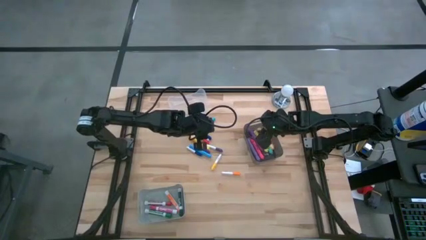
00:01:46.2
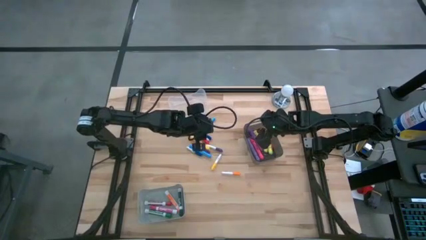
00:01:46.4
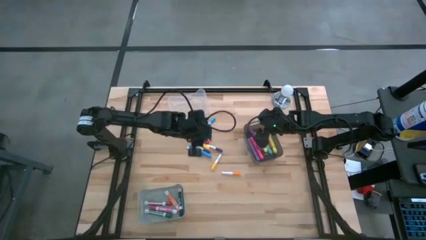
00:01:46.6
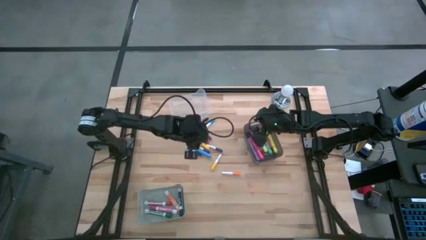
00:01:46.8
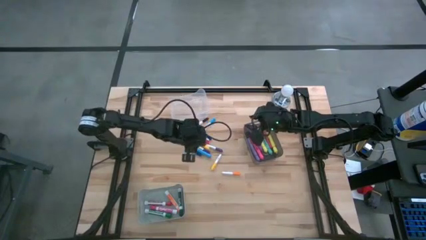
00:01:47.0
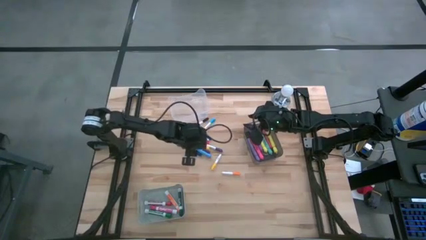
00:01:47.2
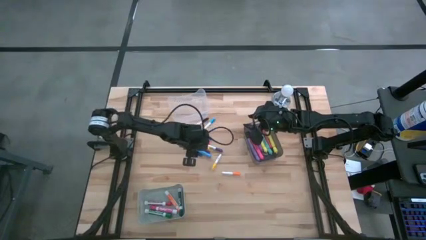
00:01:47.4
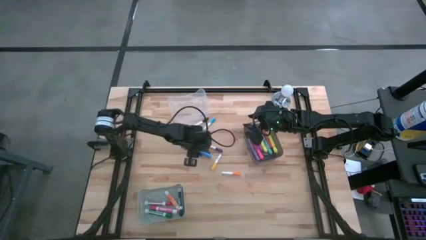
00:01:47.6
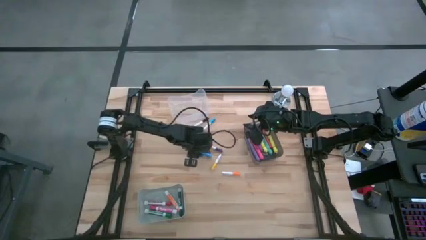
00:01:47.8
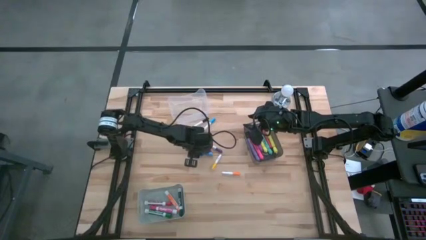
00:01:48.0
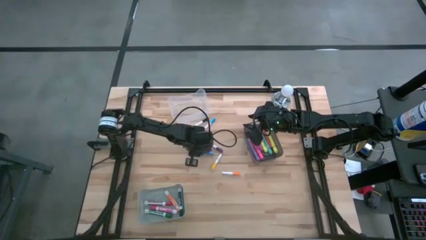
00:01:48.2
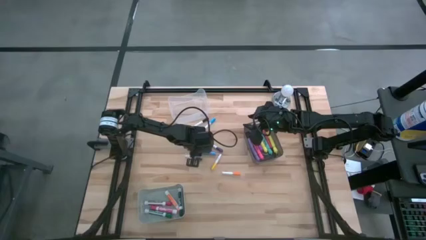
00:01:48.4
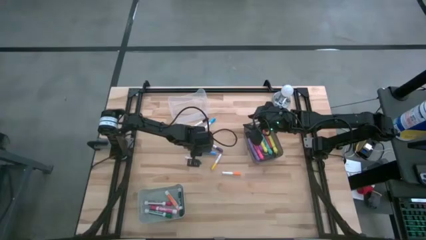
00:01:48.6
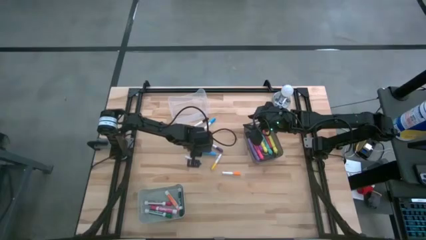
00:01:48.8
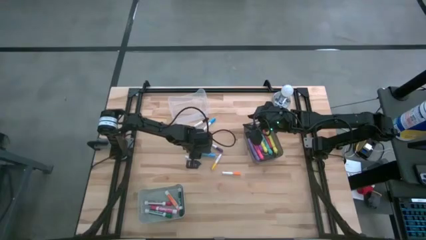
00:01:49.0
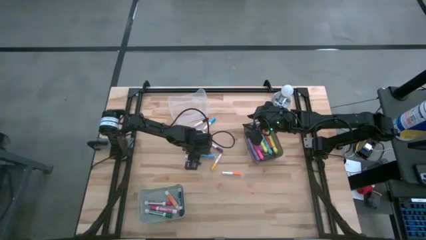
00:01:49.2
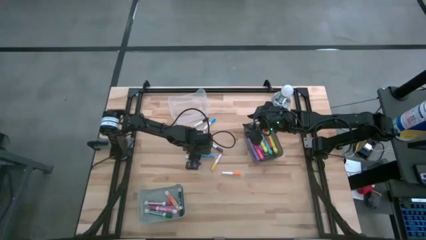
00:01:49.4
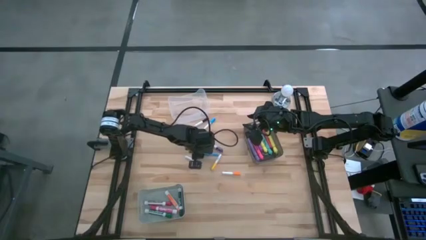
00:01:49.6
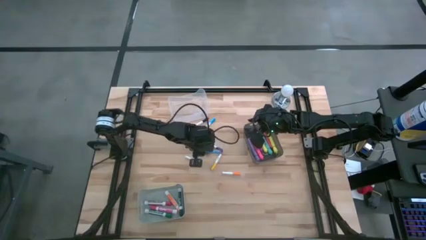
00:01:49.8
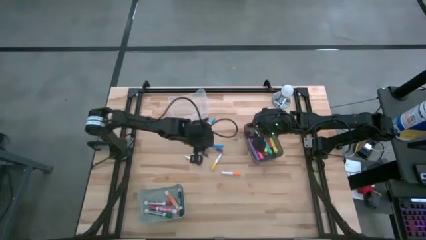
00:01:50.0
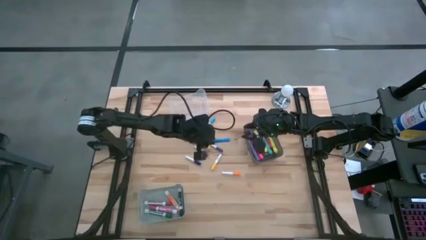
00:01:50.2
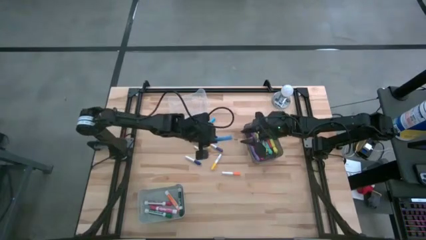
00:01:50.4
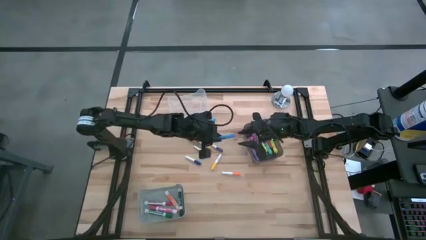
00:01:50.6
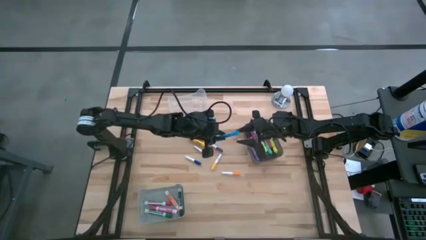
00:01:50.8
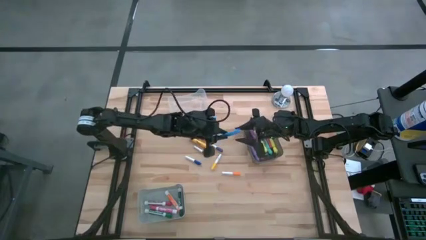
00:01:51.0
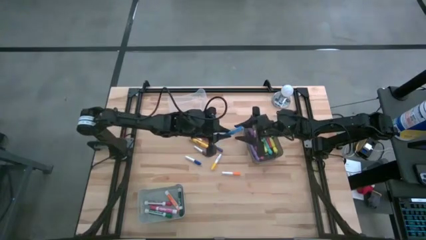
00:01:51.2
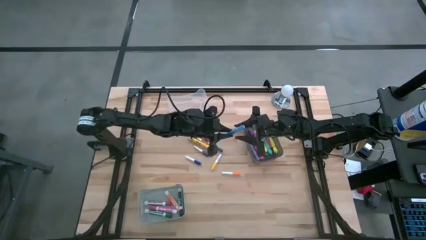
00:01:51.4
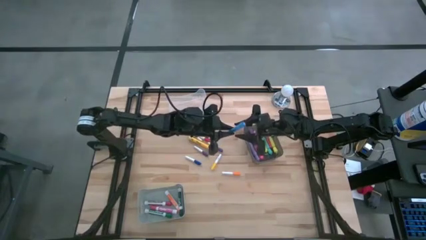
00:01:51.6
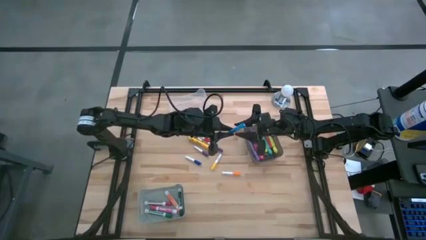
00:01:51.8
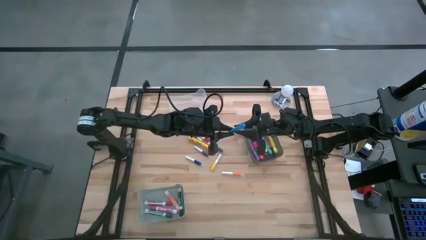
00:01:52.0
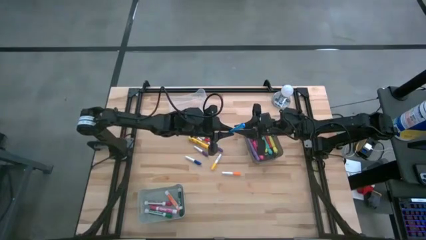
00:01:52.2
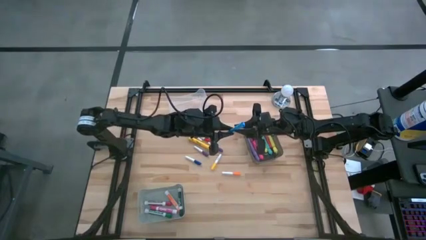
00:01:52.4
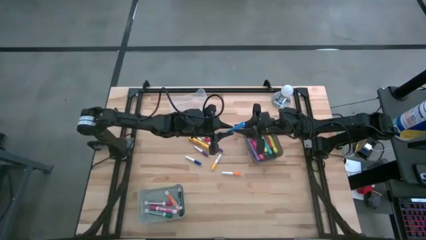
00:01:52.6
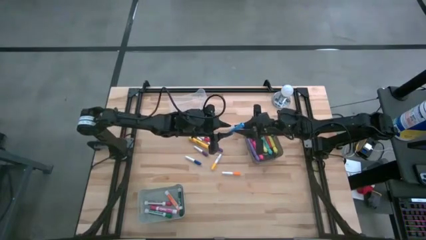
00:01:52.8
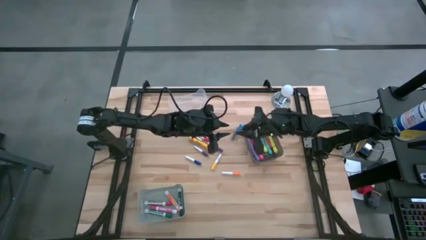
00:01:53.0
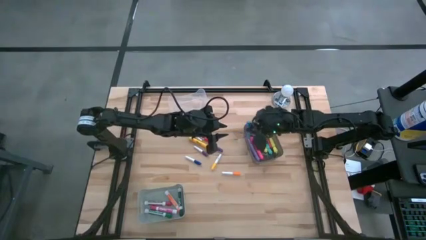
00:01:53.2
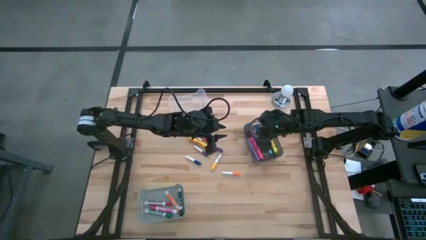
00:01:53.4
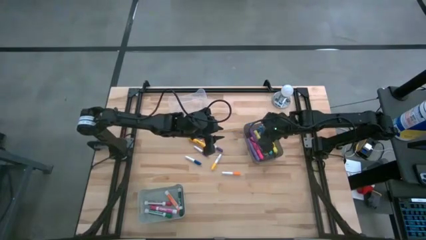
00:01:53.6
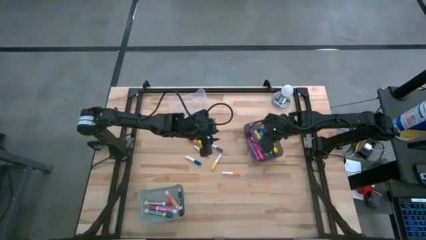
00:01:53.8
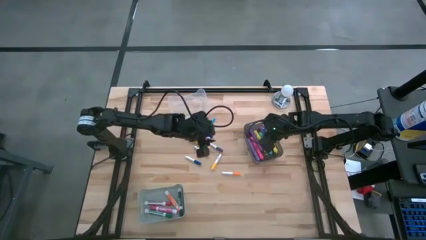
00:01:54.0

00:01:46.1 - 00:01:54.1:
Task: Pick & Place Markers
Put the light blue highlighter pen into the black bin

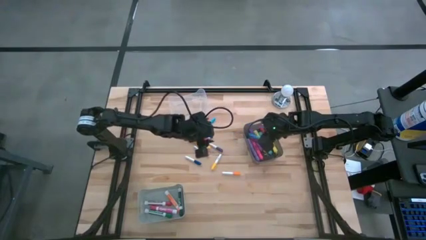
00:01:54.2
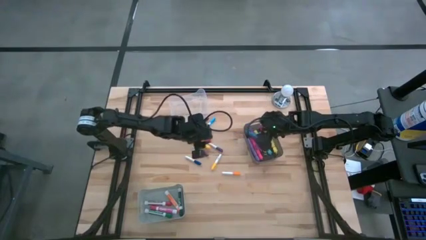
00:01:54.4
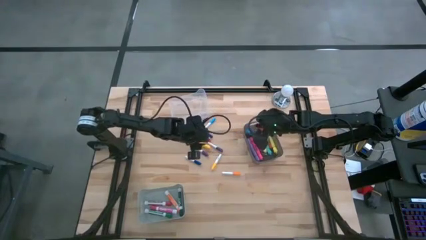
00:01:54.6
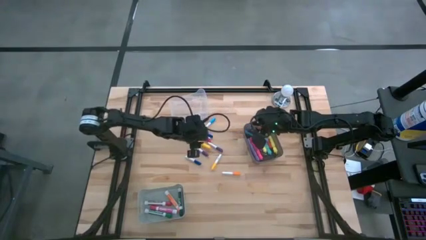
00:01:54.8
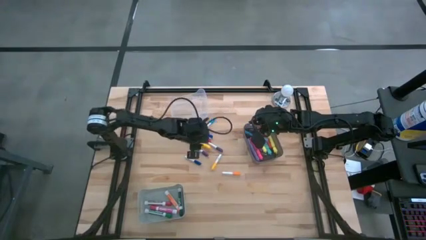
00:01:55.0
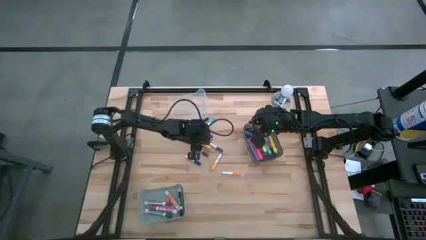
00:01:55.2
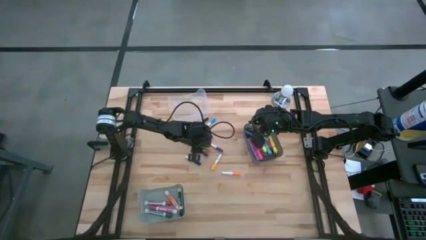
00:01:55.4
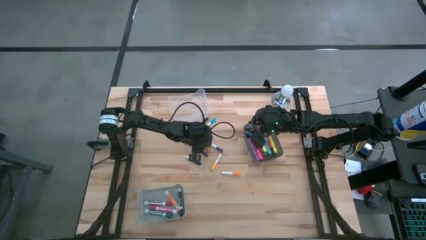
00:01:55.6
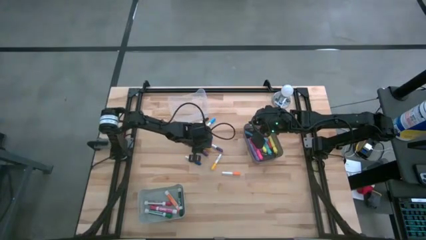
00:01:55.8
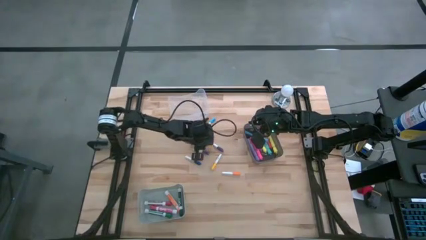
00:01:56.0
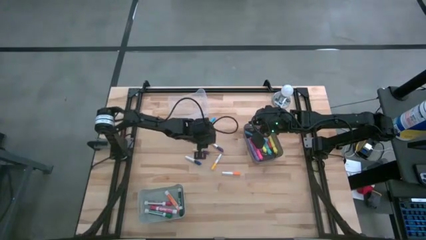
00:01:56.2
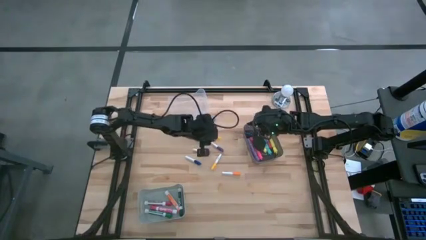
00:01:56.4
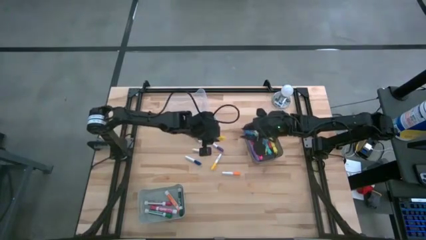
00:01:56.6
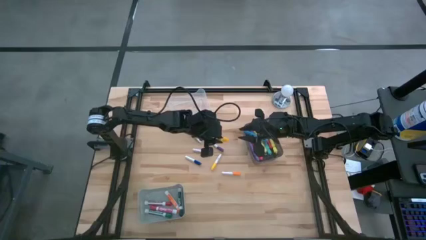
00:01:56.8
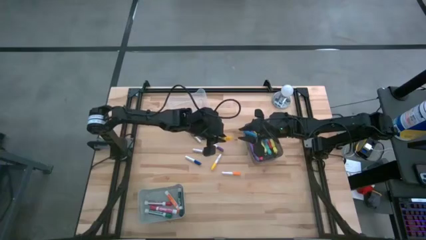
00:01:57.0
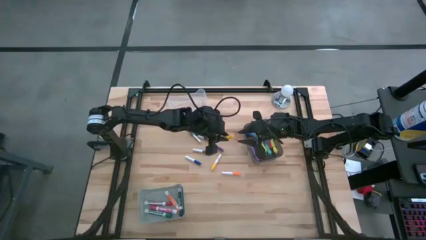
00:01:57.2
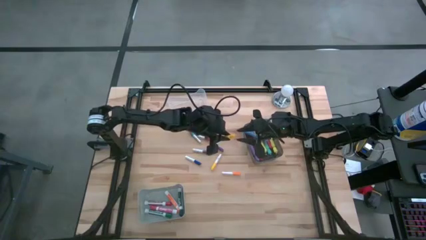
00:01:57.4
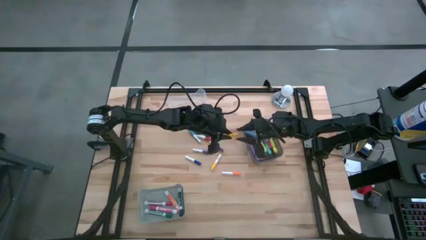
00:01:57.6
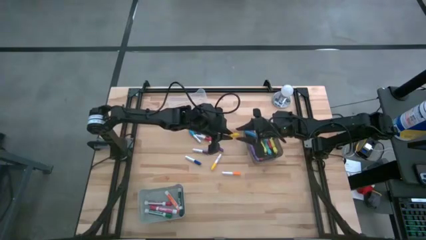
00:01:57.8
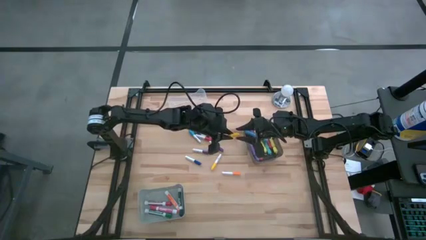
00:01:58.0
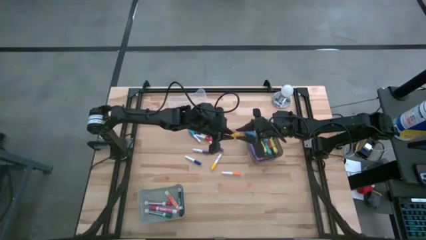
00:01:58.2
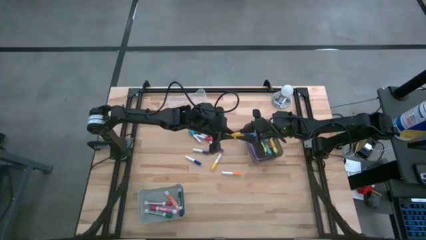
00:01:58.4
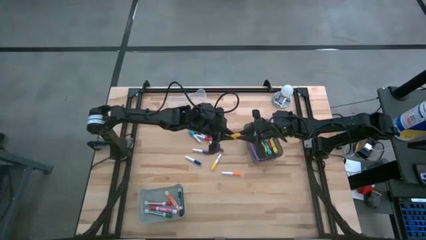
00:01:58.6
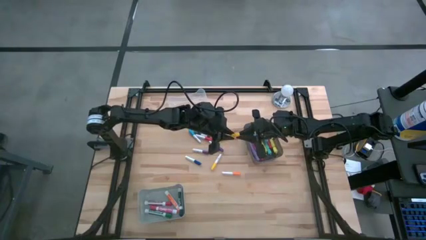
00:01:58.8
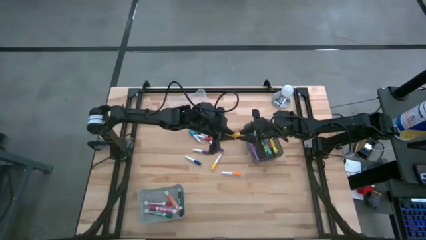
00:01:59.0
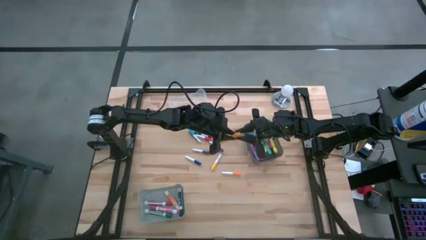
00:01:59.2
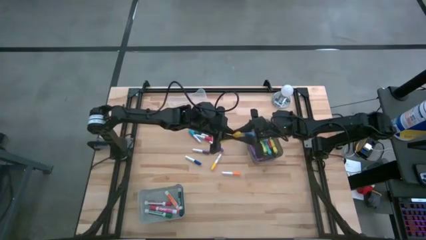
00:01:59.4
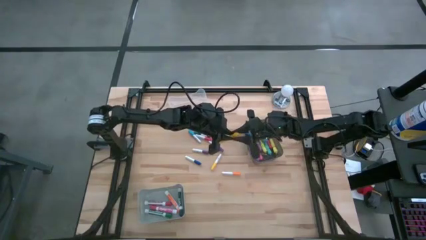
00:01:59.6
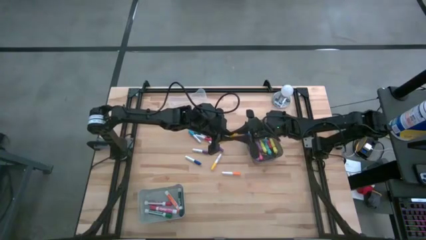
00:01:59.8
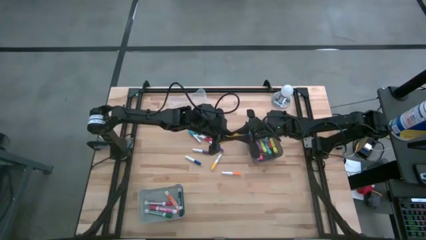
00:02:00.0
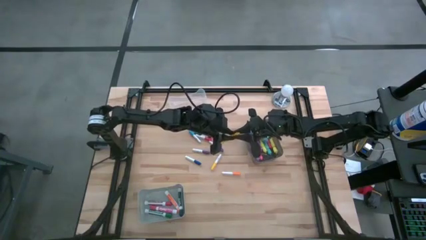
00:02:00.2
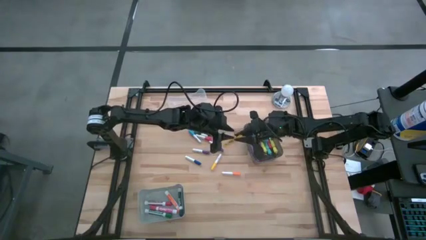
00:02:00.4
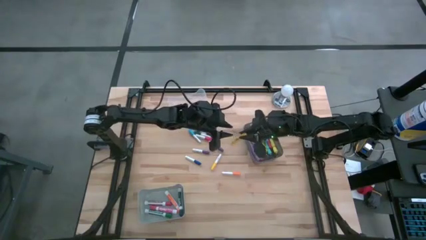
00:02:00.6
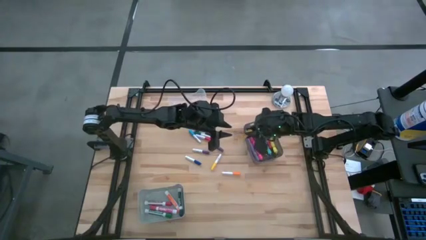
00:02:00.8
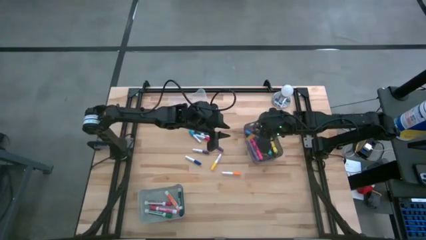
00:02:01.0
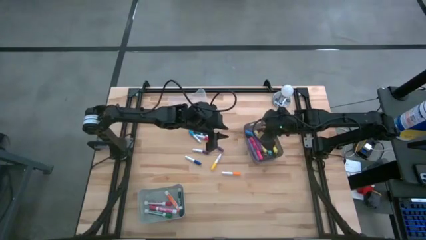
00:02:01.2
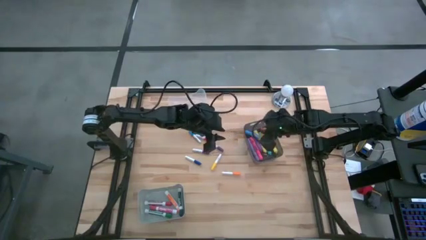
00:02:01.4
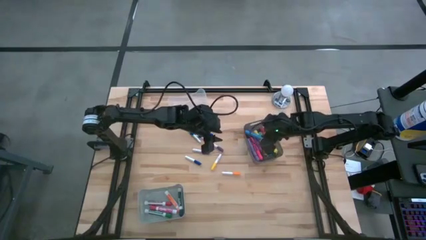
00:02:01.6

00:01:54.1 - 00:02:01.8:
Put the dark yellow highlighter pen into the black bin

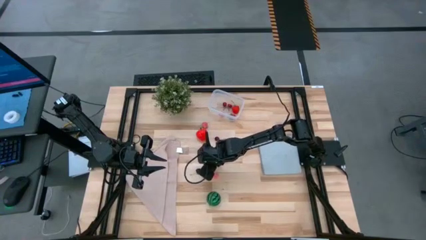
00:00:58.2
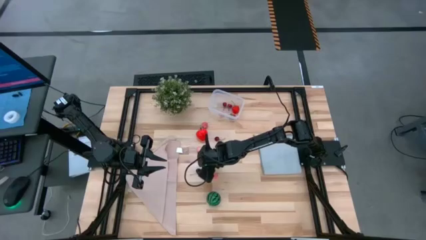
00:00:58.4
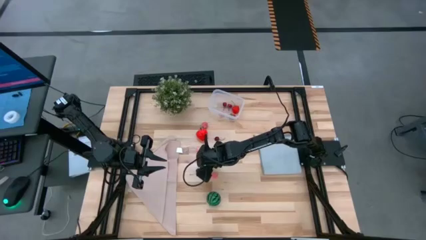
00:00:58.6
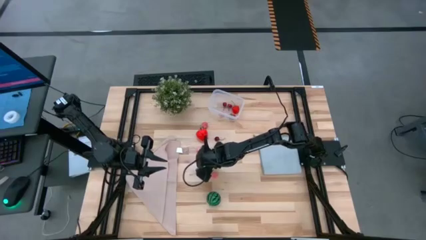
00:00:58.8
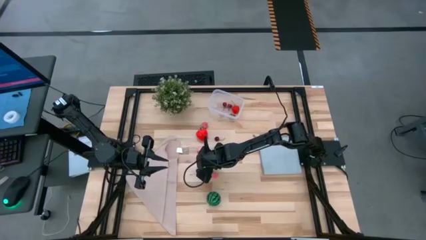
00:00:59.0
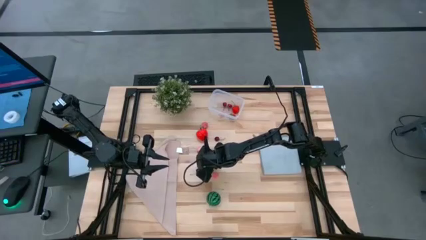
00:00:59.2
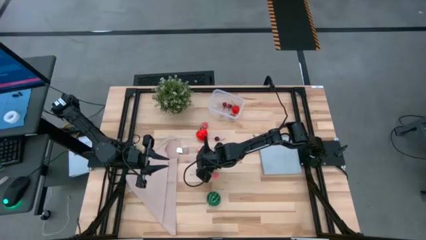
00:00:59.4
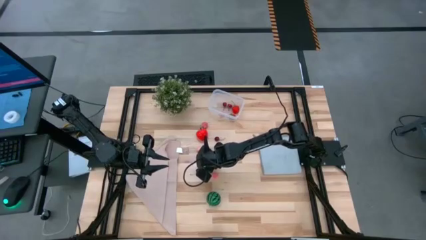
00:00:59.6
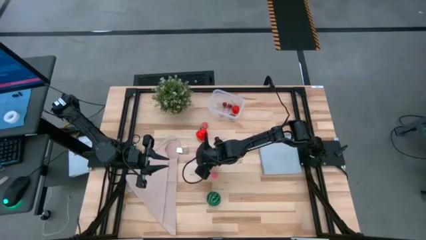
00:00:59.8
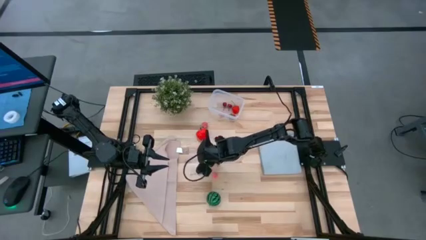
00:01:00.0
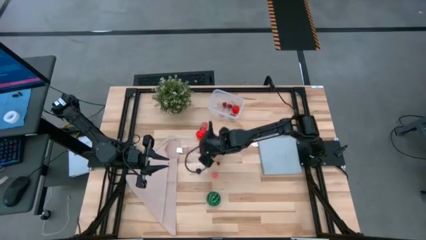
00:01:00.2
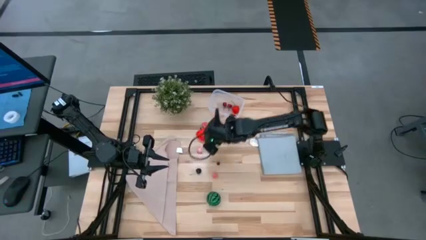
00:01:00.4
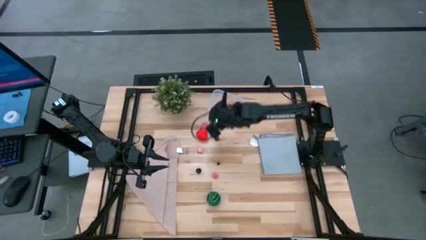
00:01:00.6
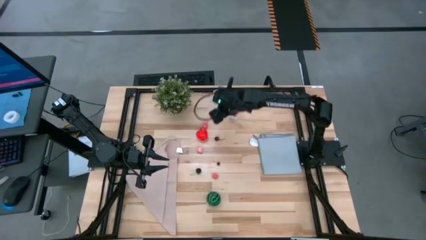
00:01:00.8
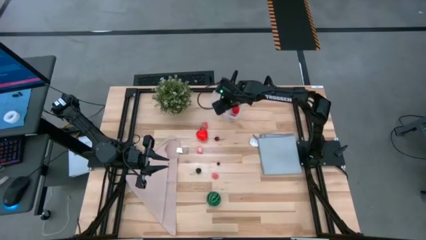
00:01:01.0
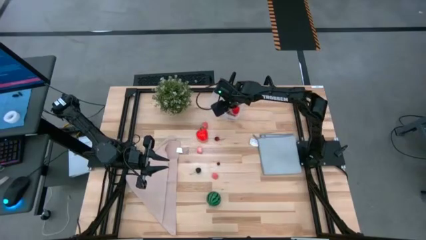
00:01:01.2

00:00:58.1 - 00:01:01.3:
Task: Pick and placing Produce into tupperware
Put the blackberry into the transparent bin
